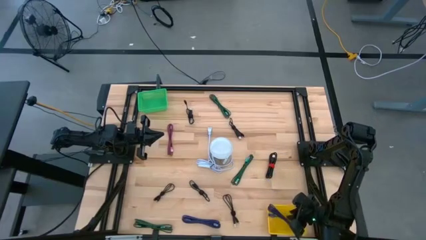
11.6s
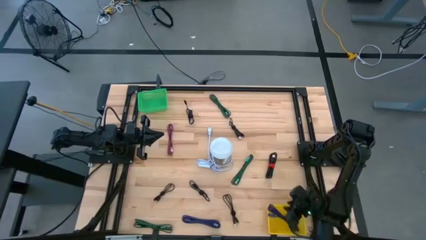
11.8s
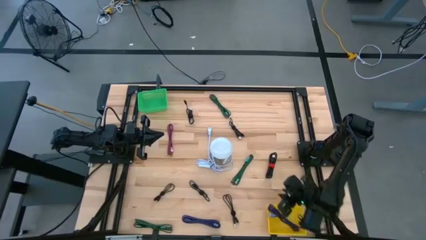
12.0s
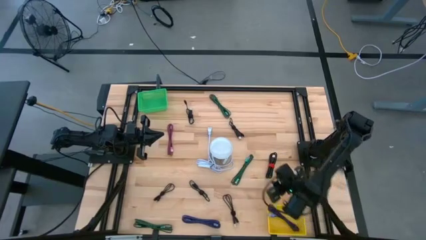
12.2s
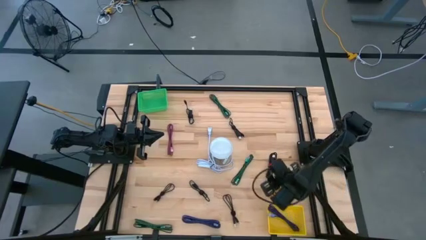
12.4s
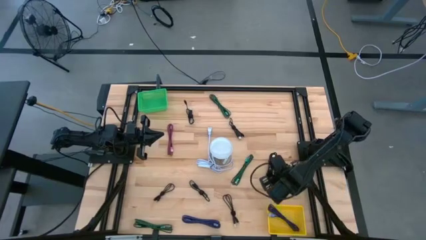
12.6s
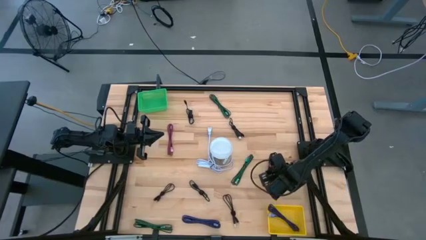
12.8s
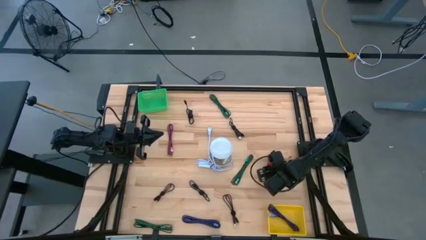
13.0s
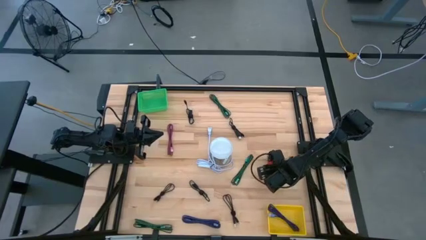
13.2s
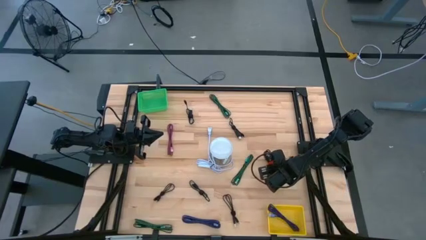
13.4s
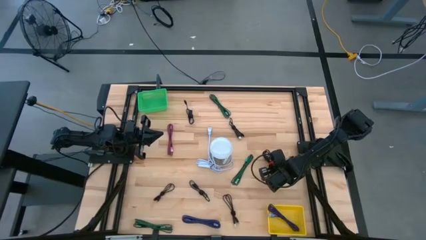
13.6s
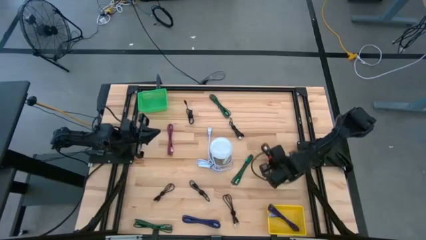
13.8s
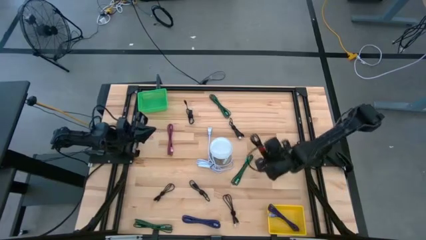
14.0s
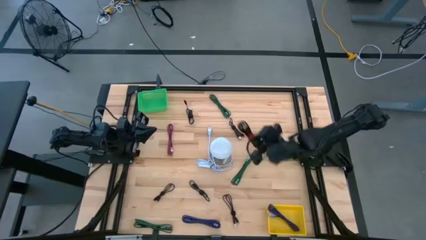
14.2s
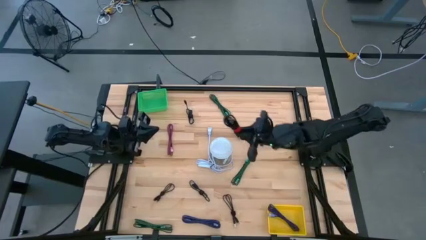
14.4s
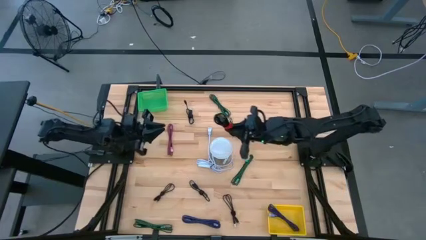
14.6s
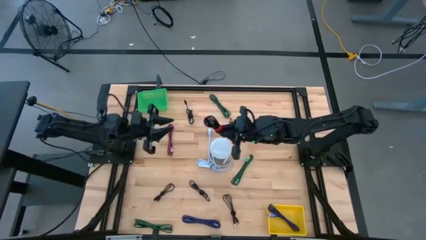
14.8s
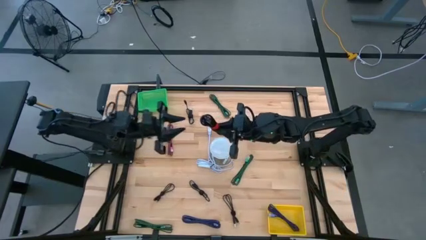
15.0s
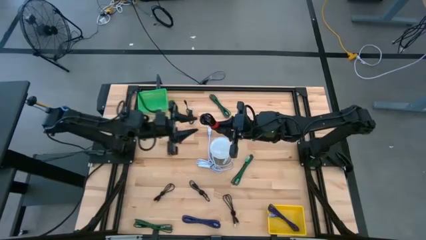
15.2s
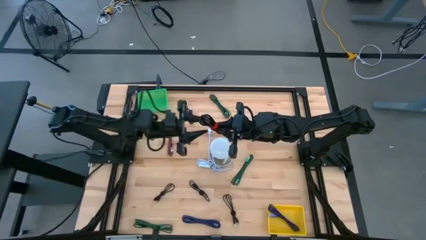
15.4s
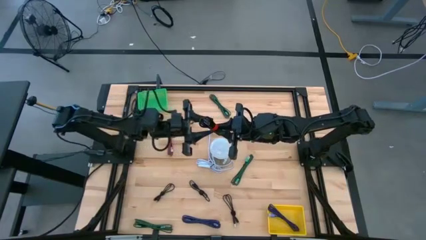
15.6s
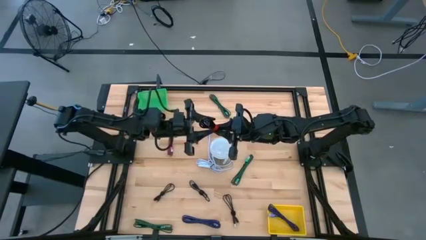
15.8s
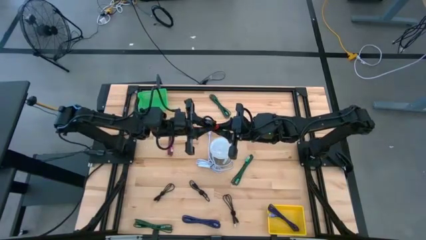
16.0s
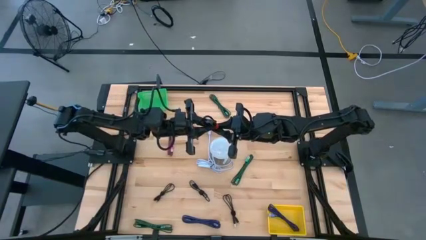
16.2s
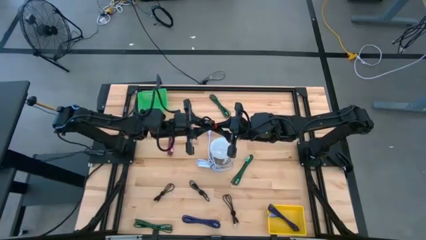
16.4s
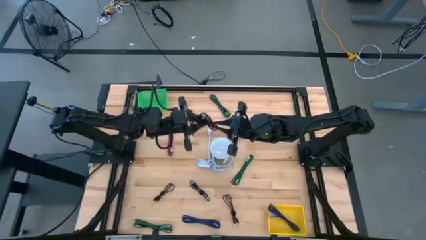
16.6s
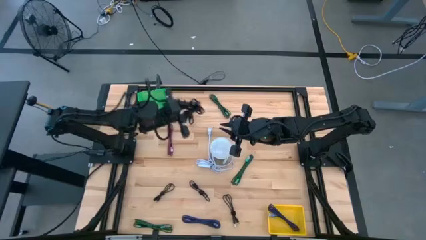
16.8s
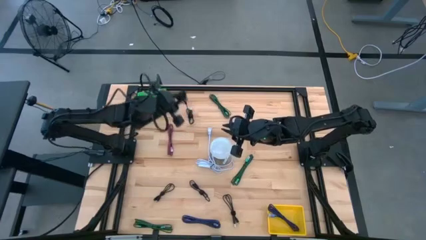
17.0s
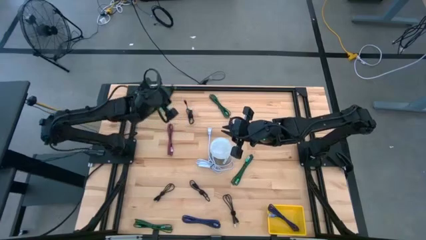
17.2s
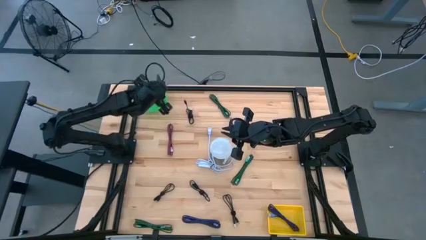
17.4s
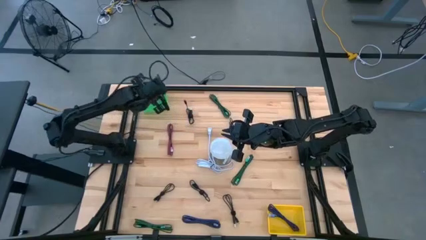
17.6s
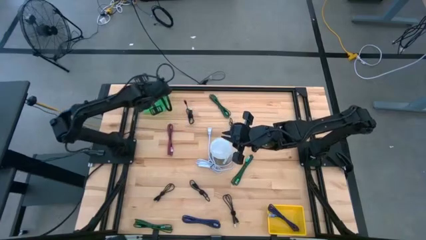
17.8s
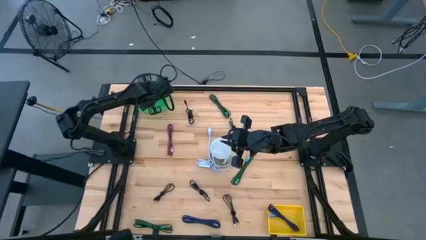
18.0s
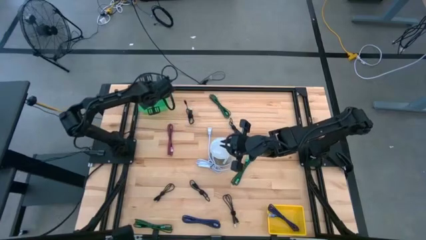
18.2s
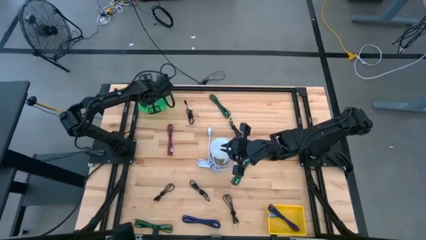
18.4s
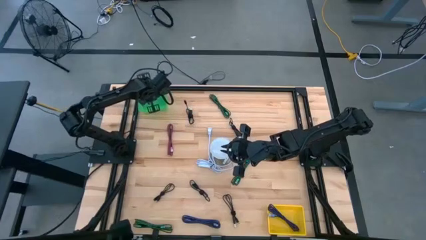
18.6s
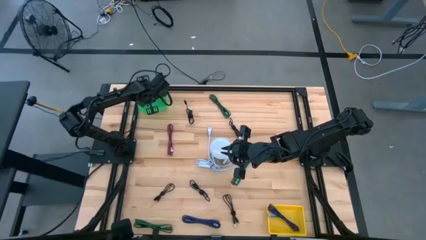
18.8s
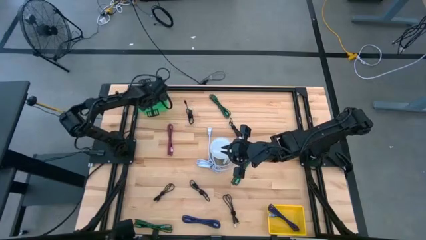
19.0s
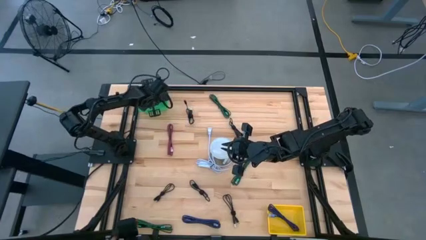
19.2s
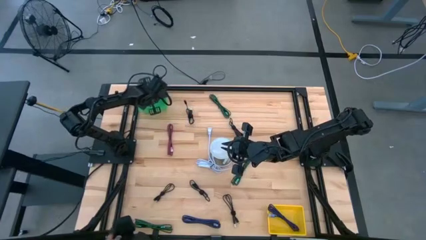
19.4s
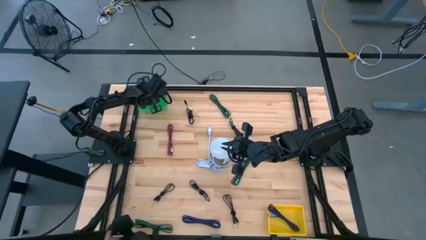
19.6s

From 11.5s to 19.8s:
Task: Pick & Place USB Port
Put the plain black charger cable into the green basket

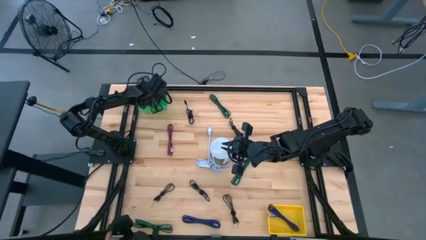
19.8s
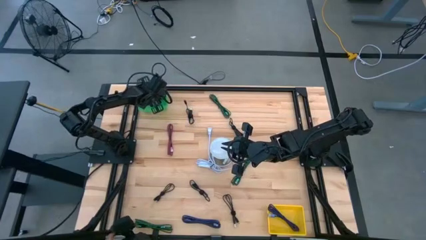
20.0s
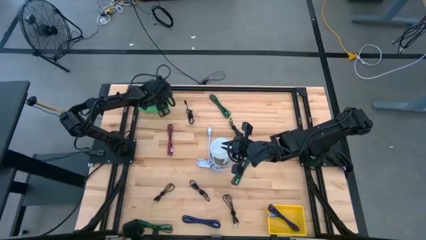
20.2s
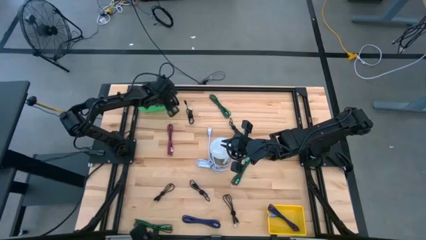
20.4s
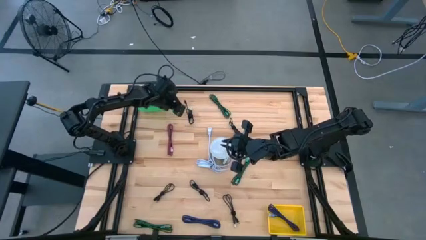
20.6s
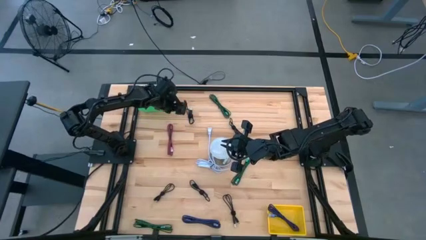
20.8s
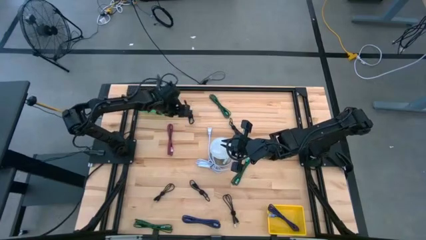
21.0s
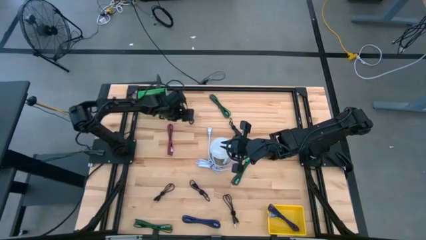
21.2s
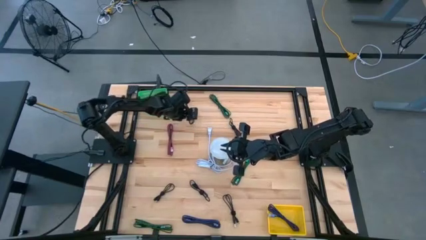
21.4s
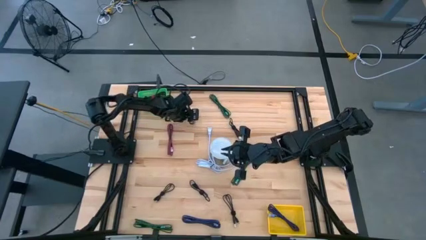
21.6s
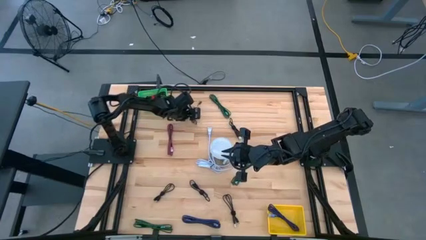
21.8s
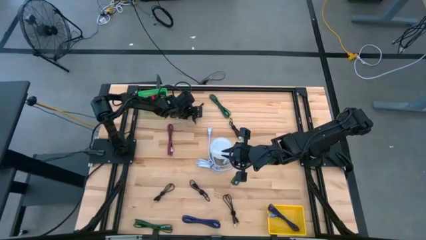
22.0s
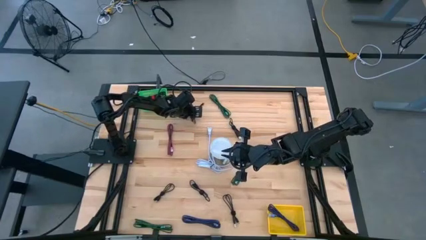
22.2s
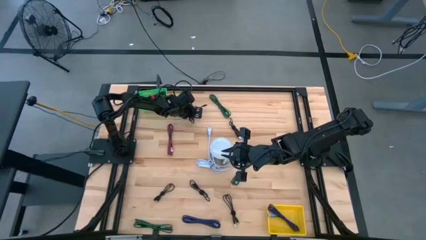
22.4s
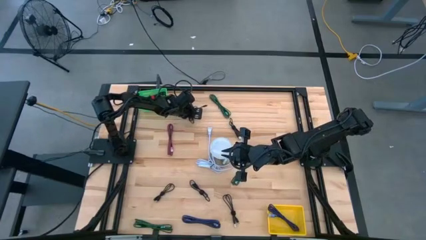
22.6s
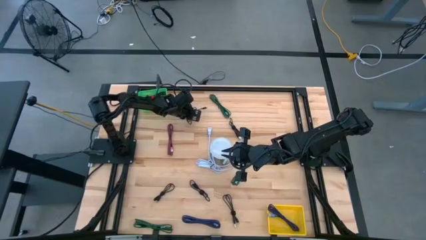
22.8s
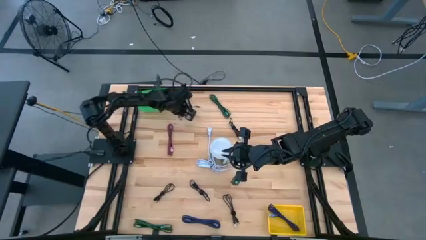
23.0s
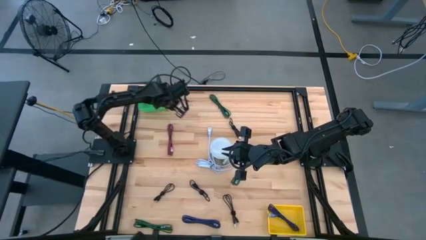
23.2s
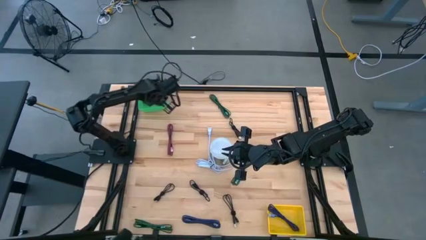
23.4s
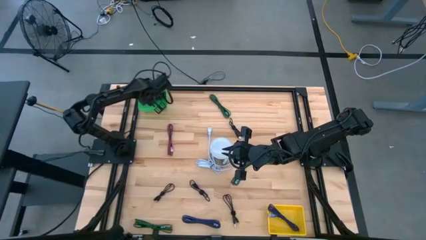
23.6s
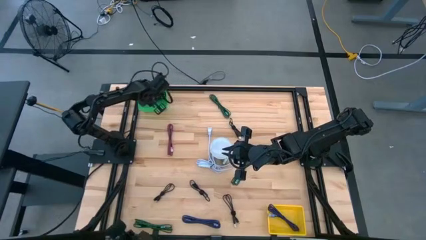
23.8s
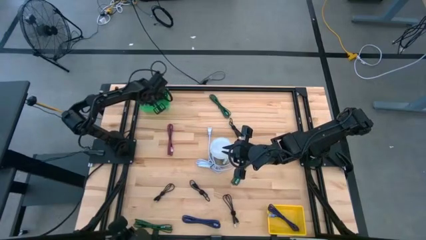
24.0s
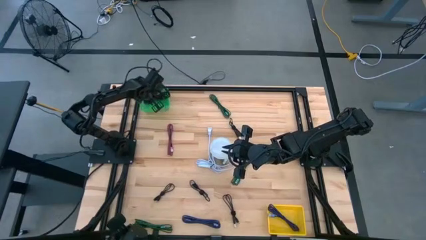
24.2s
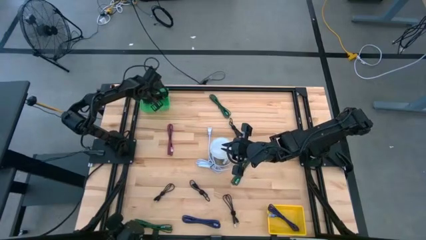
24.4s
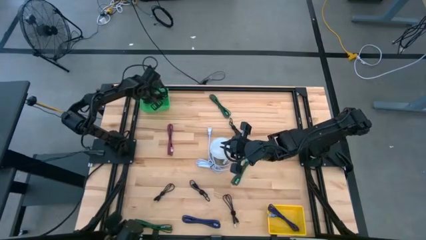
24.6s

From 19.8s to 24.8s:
Put the plain black charger cable into the green basket

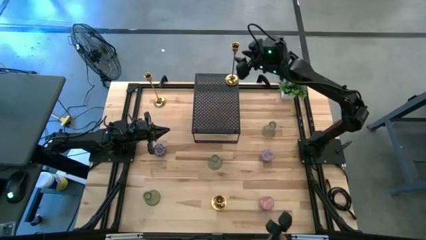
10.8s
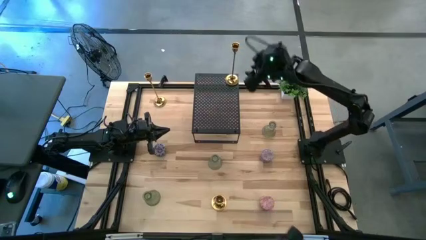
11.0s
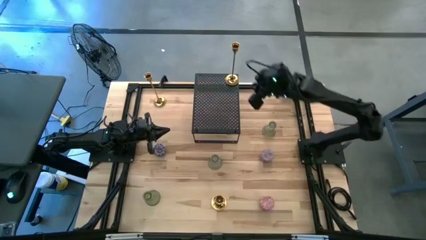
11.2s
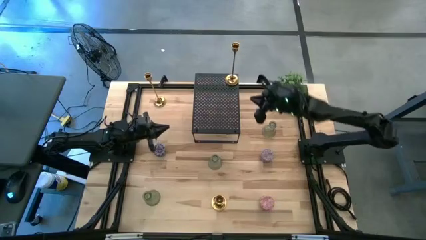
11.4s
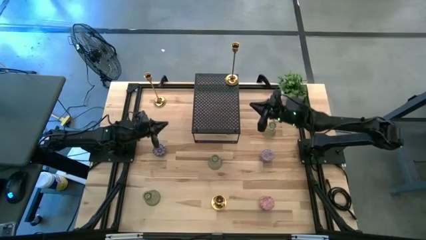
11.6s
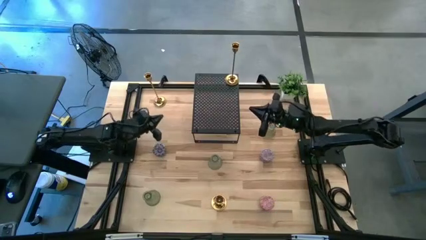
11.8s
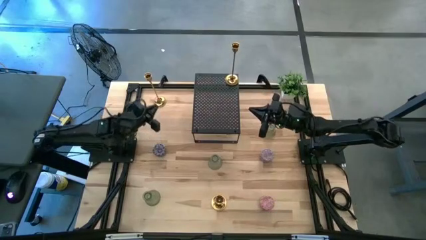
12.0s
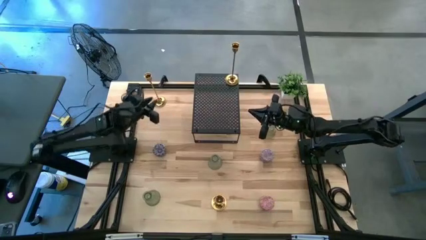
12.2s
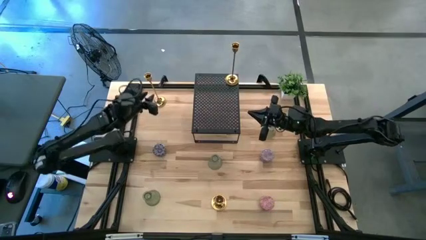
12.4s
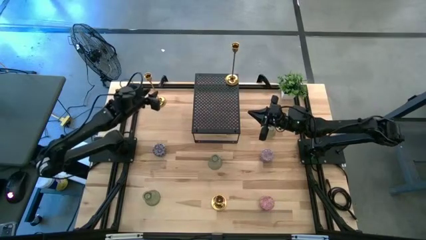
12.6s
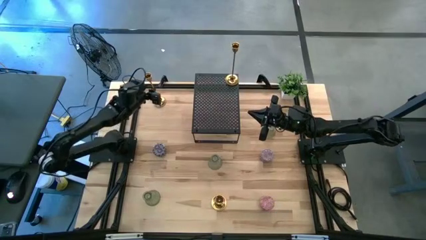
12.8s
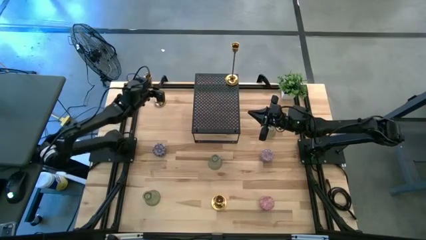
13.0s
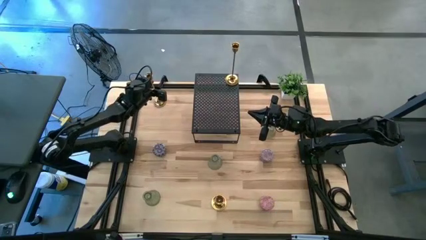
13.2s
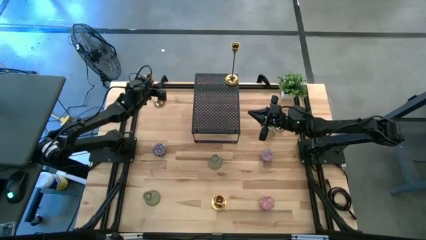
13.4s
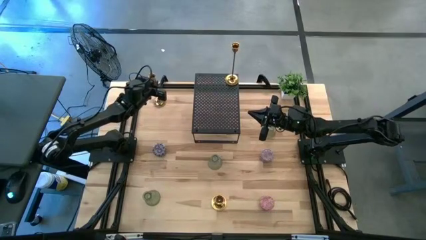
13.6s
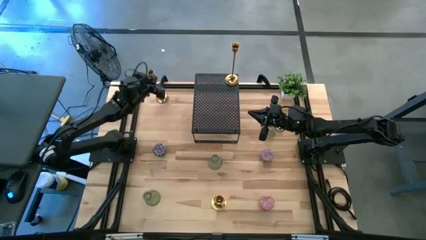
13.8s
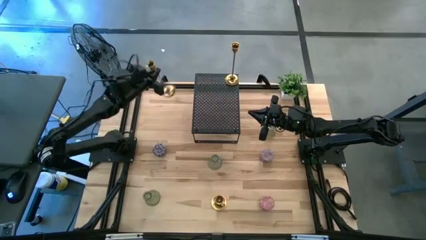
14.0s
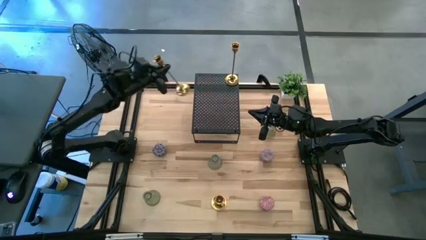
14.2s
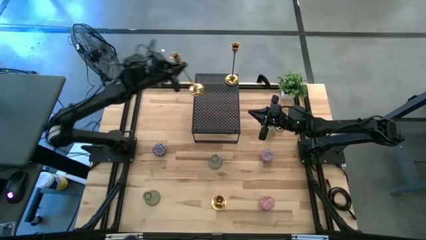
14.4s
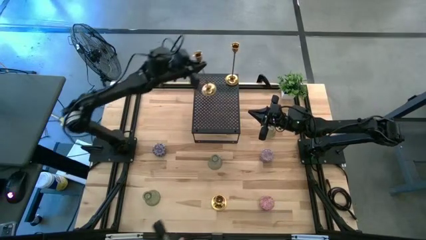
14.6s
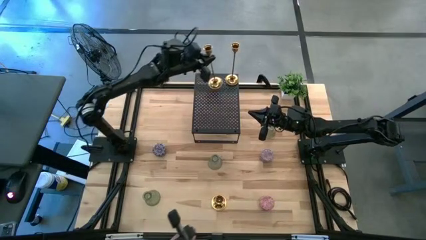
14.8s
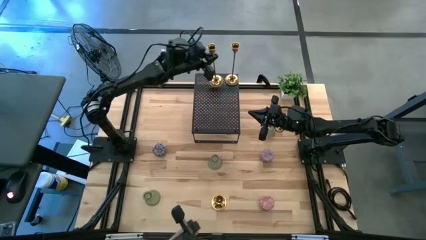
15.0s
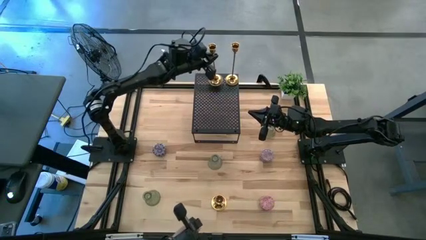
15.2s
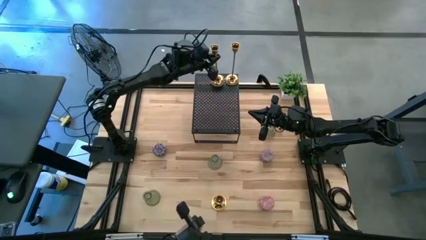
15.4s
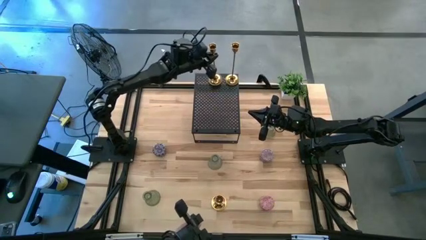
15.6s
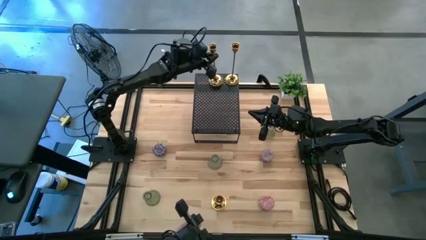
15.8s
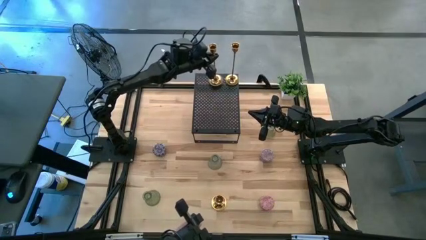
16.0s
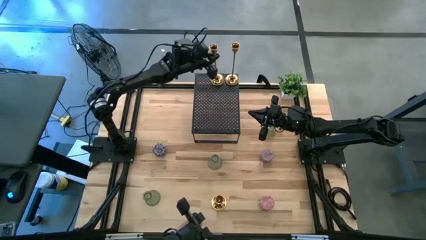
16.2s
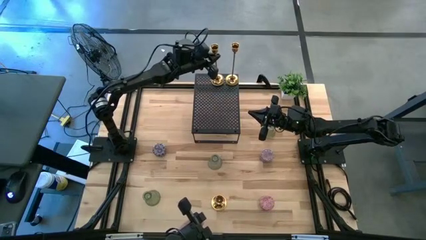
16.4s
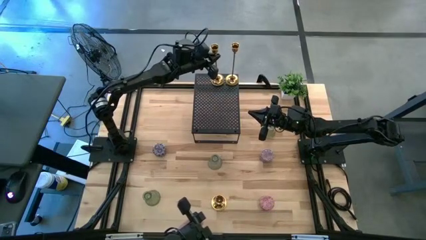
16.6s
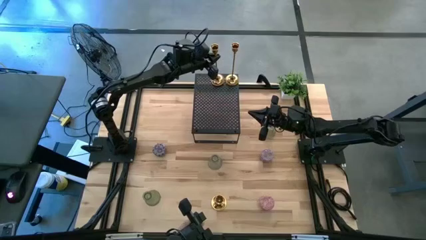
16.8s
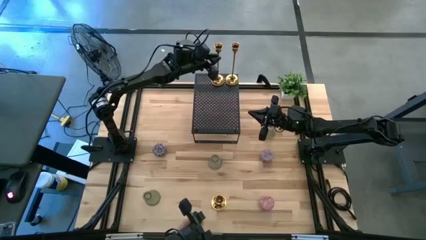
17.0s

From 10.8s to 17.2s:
Task: Pick & Place candle stick holders
Put the top gold candle holder on the shelf
